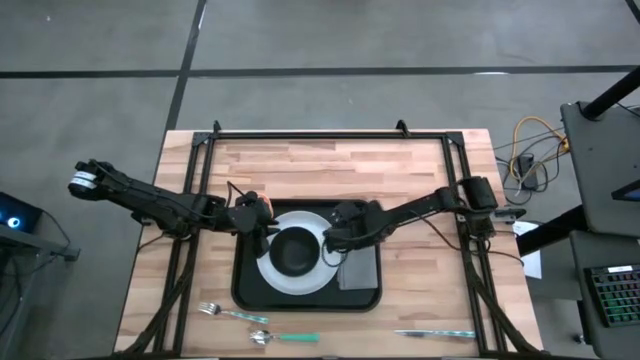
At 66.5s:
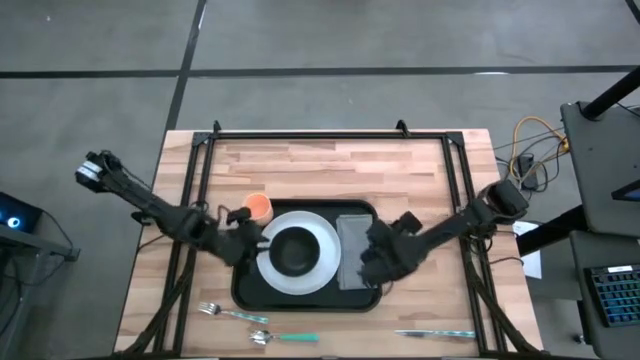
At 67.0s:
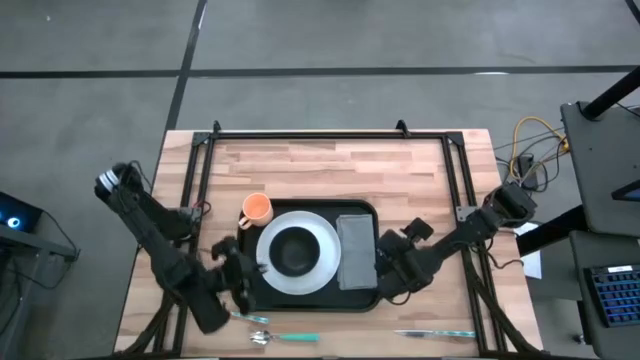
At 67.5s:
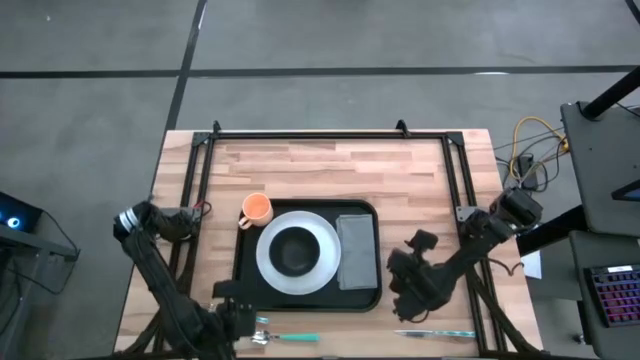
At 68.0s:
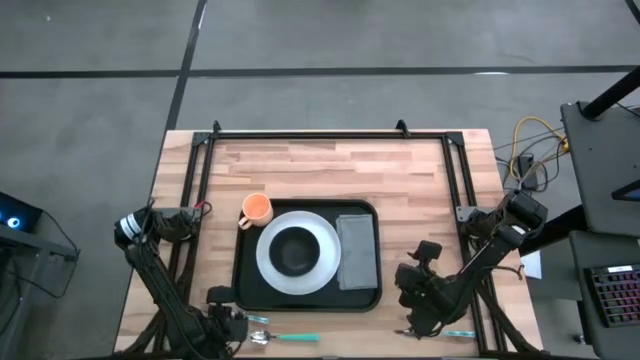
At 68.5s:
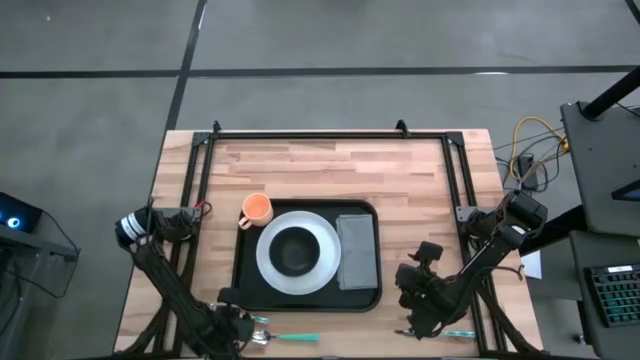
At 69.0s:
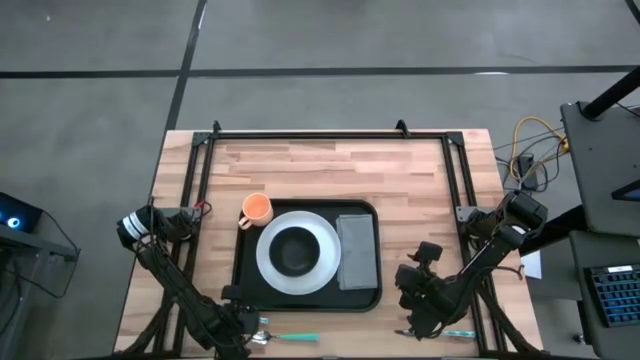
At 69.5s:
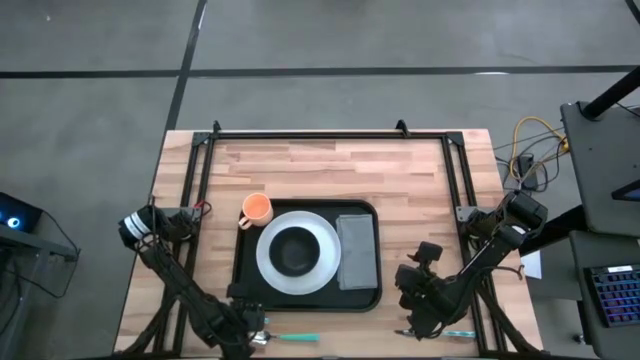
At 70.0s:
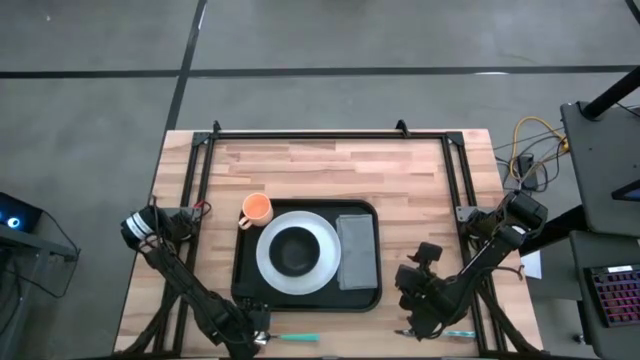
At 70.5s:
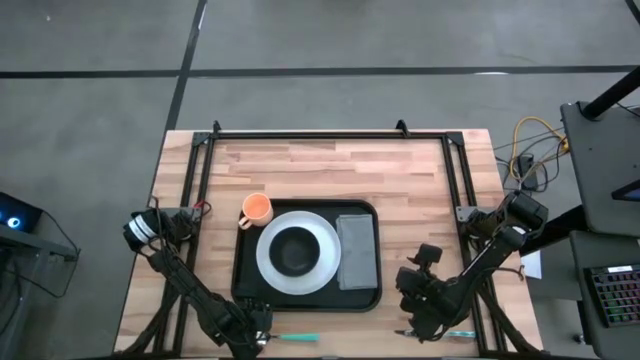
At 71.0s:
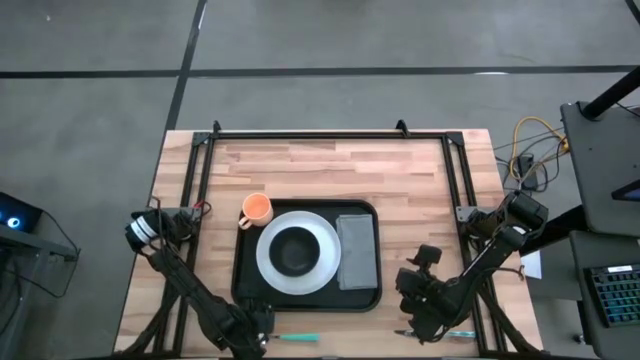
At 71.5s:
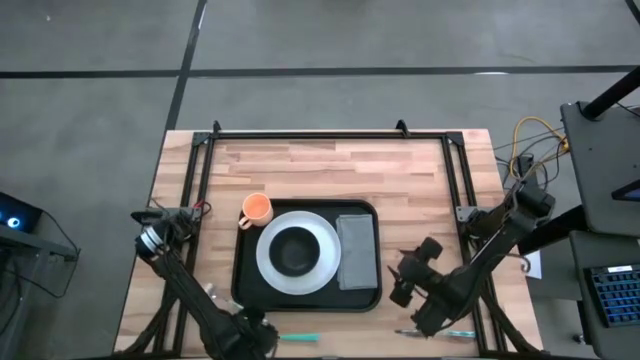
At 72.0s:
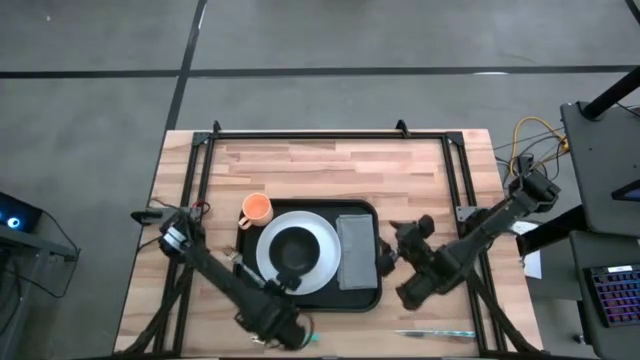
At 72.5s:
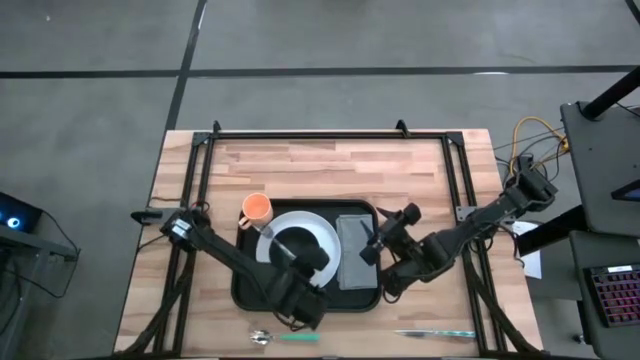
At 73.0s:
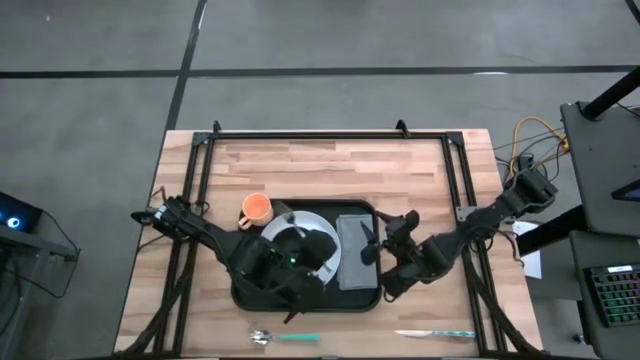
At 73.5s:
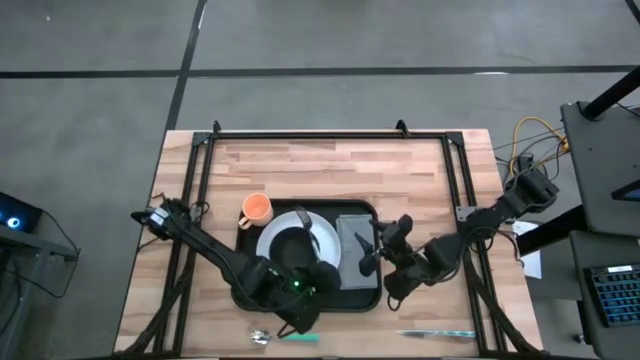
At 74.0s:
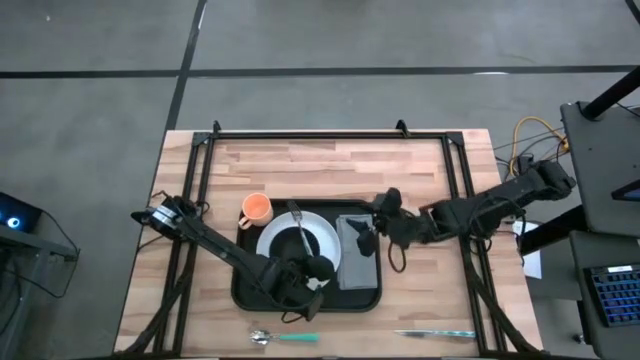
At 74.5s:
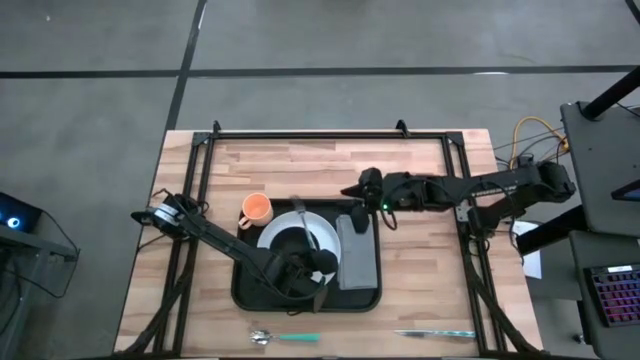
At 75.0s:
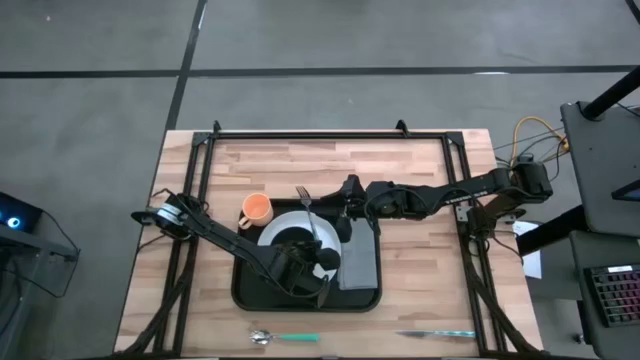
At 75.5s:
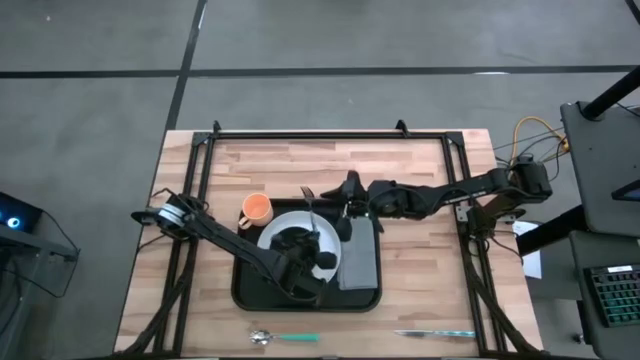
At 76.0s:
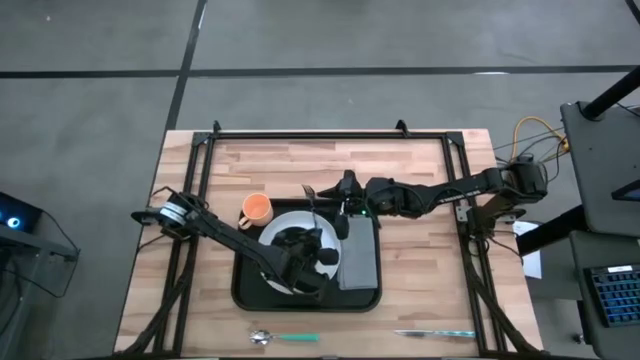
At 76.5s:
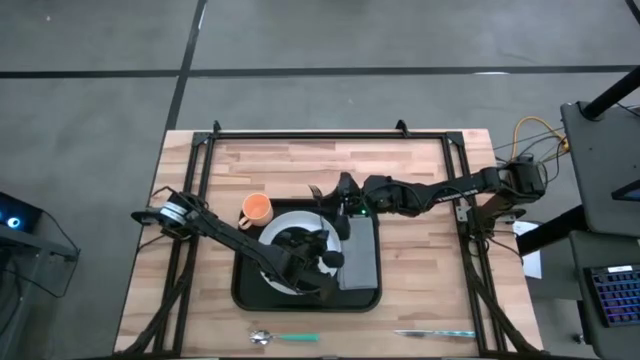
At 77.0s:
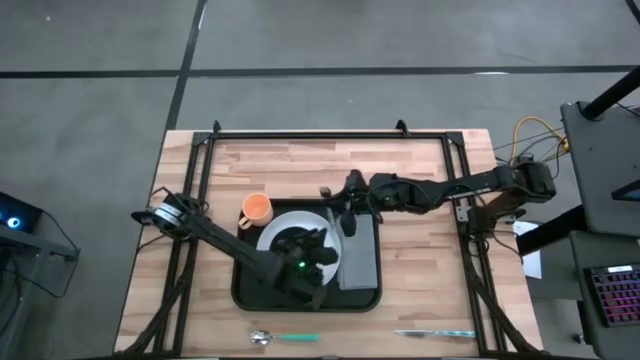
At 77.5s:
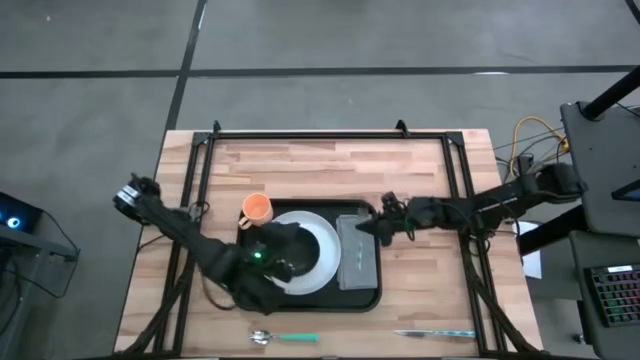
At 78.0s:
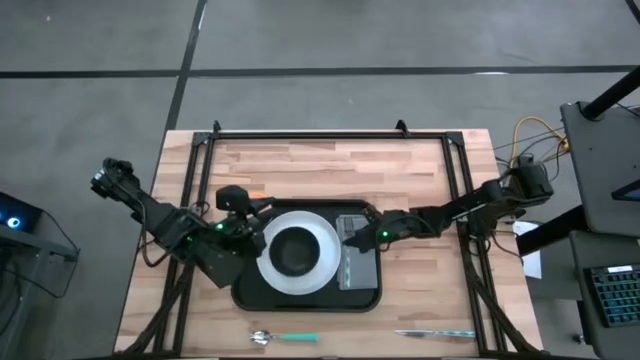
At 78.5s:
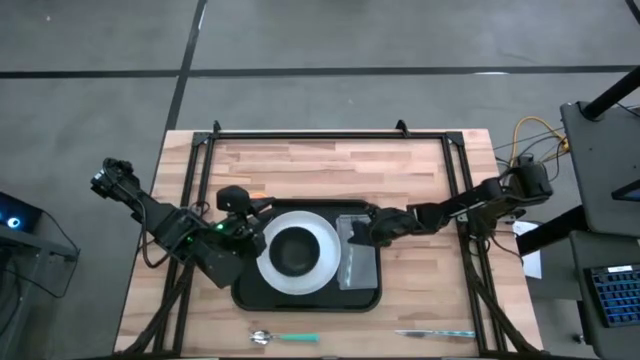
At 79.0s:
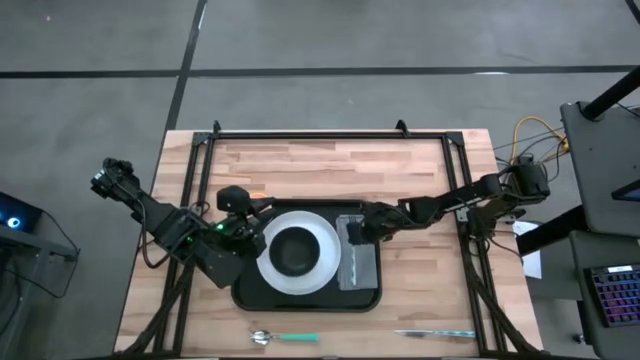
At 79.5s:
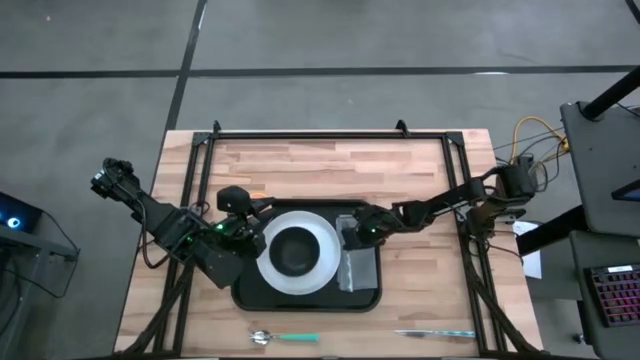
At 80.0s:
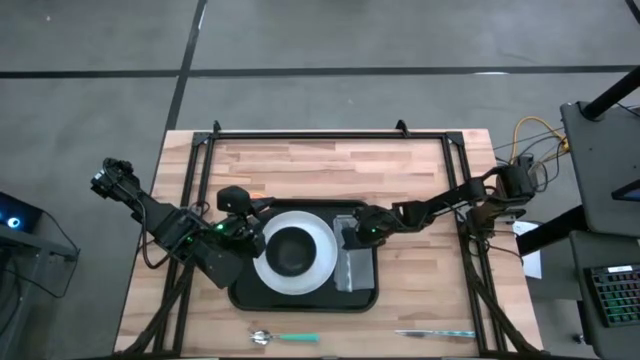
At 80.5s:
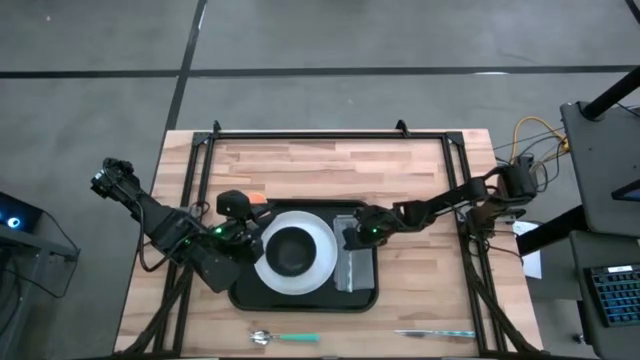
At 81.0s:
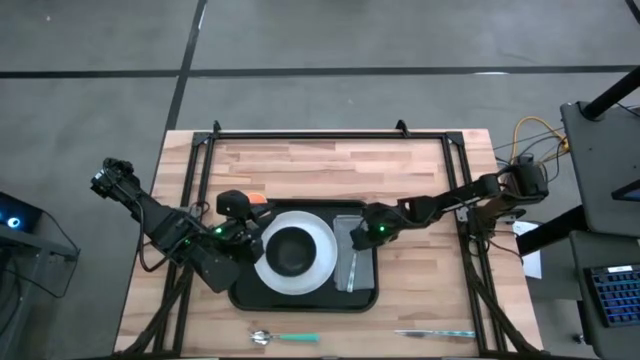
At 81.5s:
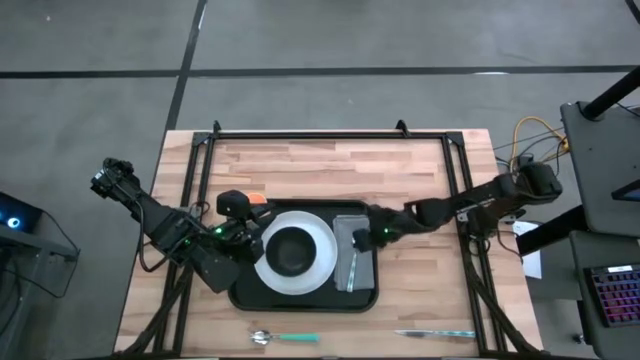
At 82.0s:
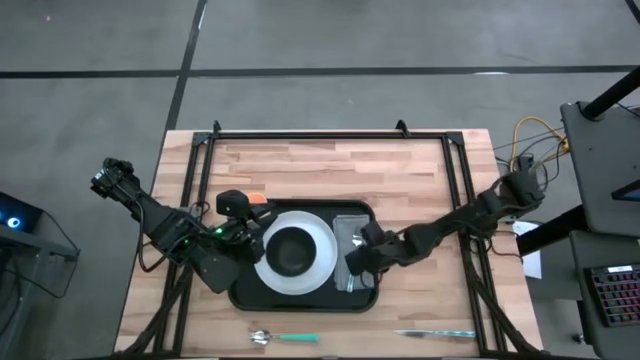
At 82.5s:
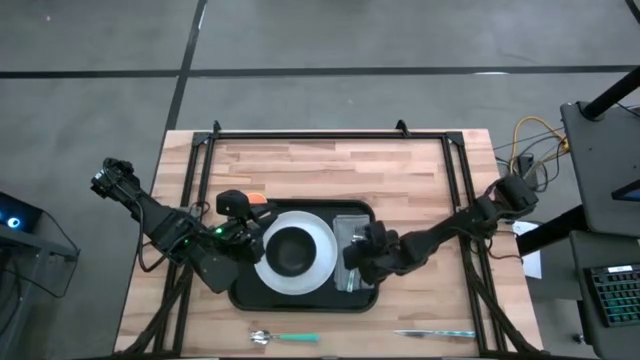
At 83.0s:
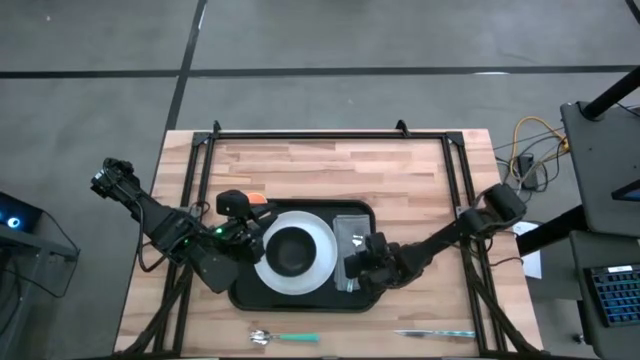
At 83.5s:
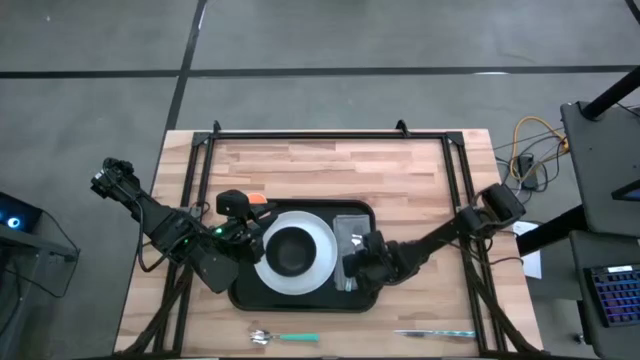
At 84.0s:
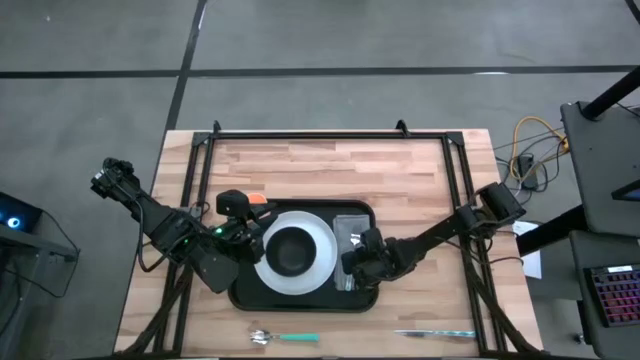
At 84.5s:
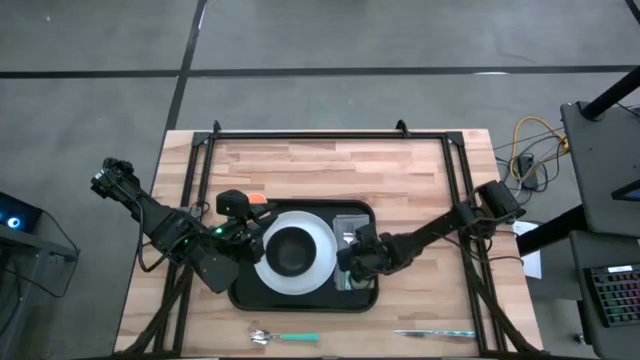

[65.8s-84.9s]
Task: Set up tray
Put the green fork on the gray table napkin on the black serving tray

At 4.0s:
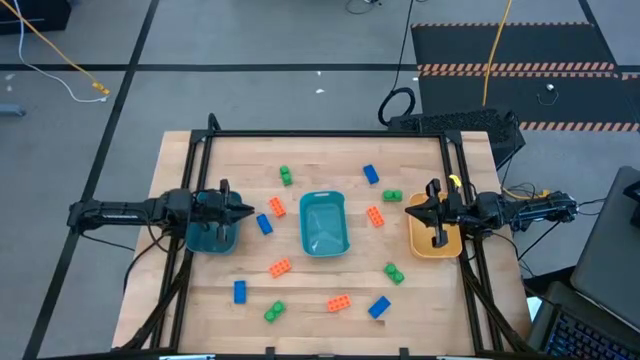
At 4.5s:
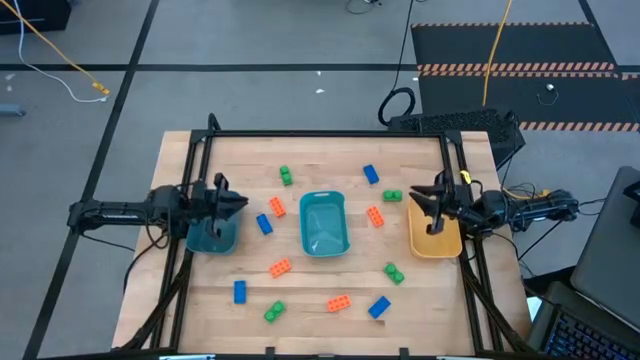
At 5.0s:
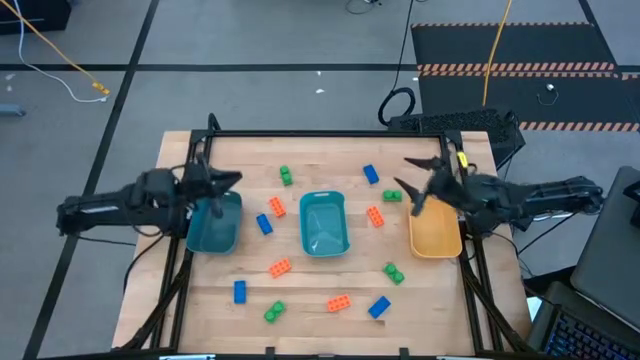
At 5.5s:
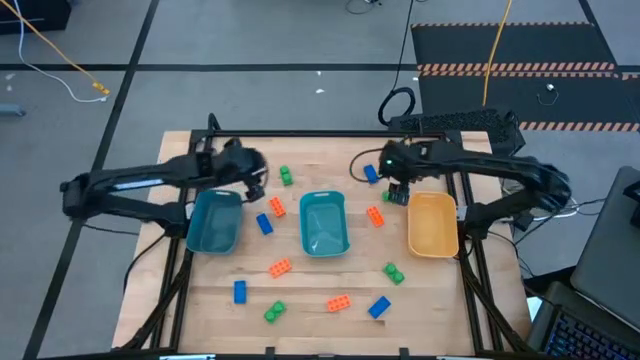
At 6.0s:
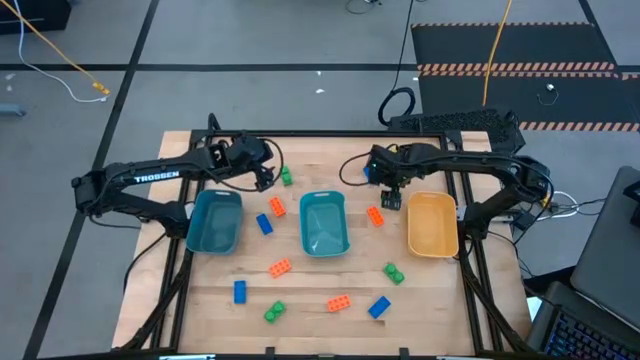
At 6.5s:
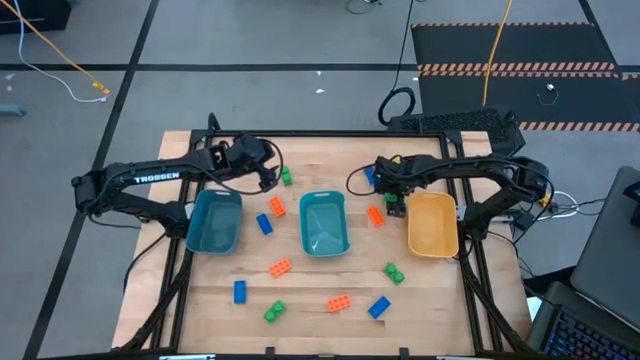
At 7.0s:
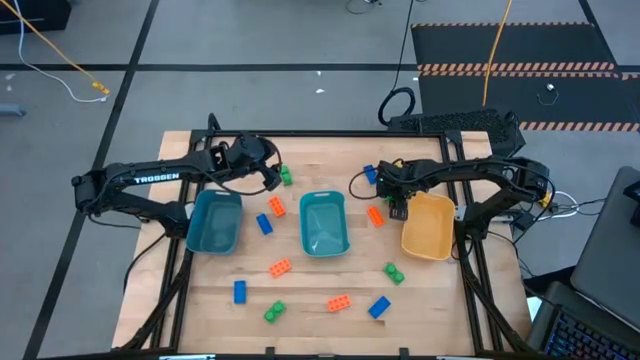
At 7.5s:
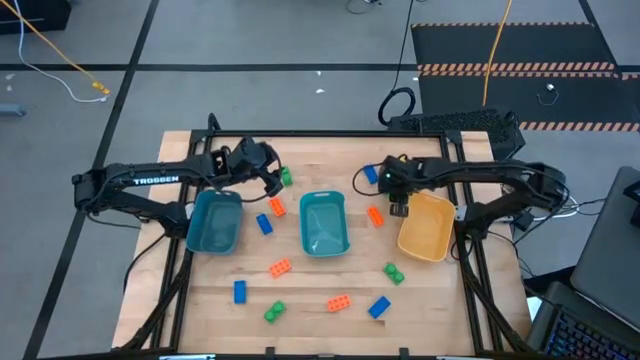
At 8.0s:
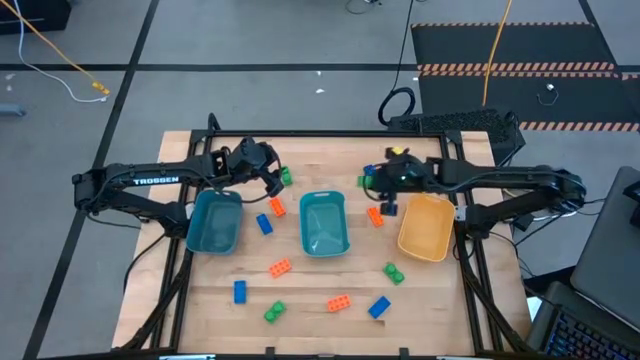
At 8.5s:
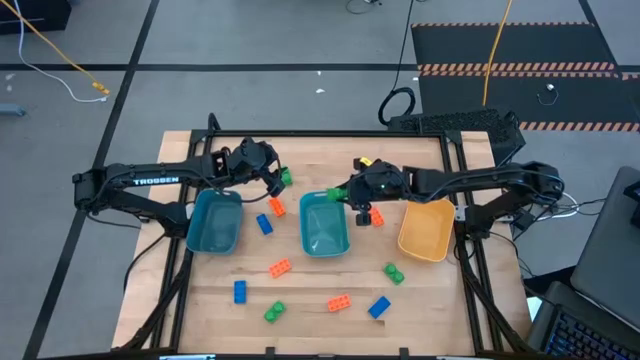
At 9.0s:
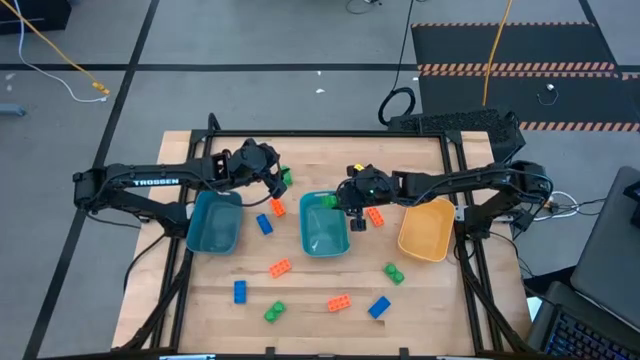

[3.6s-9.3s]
Task: Sort & place blocks by color
Put the green game piece into the light blue bin
